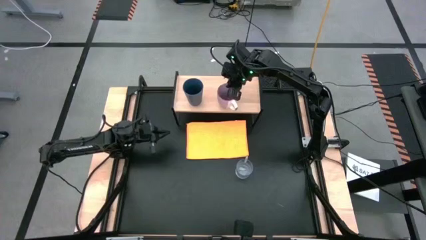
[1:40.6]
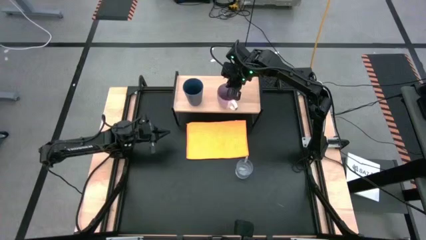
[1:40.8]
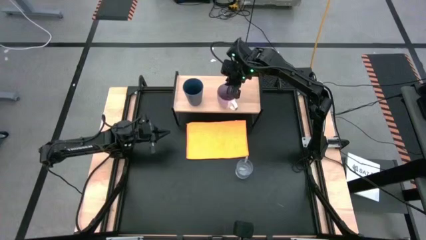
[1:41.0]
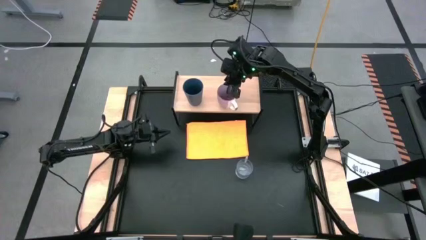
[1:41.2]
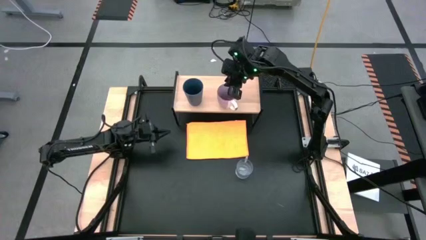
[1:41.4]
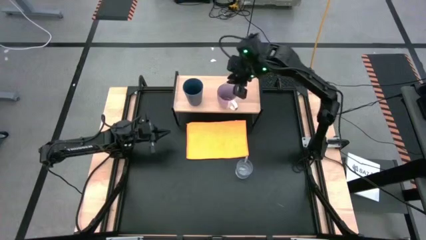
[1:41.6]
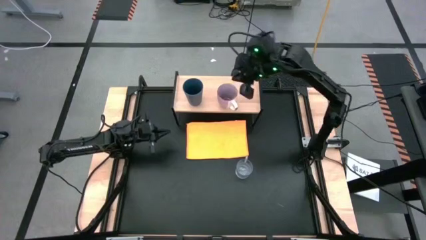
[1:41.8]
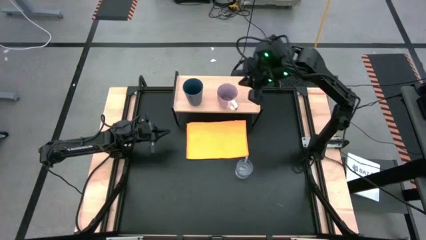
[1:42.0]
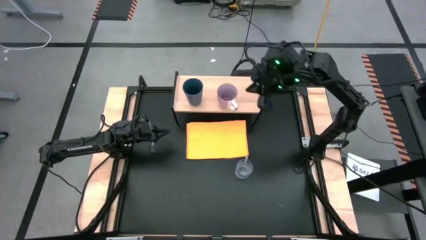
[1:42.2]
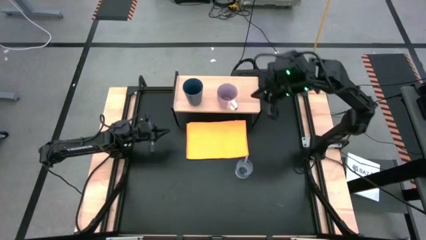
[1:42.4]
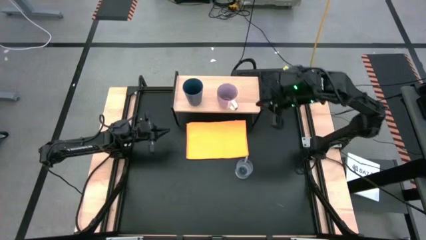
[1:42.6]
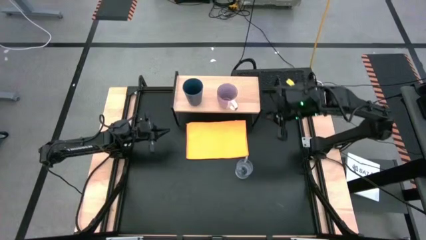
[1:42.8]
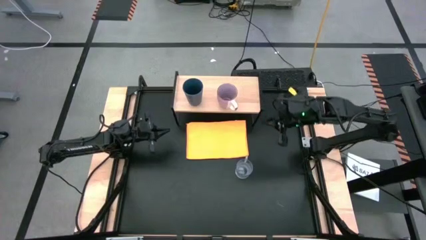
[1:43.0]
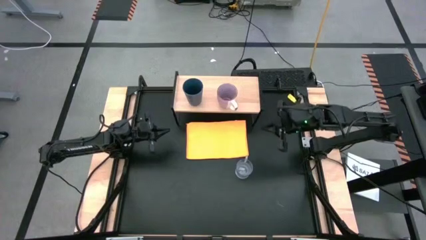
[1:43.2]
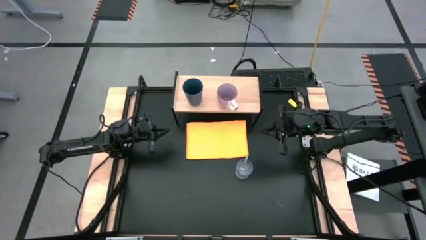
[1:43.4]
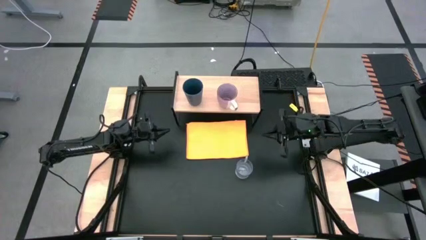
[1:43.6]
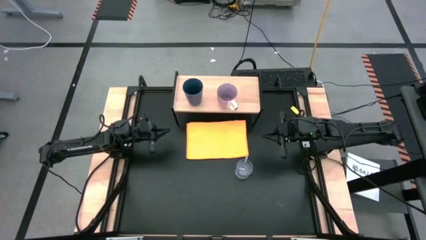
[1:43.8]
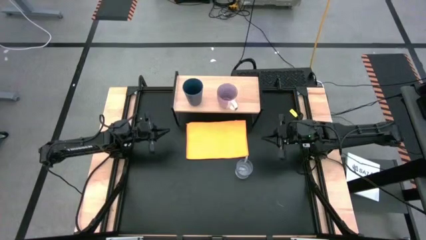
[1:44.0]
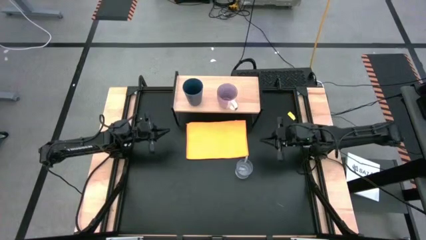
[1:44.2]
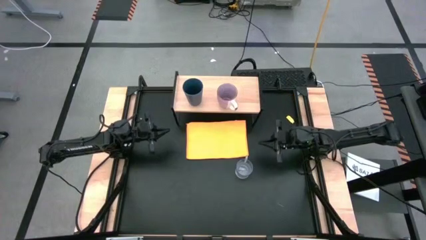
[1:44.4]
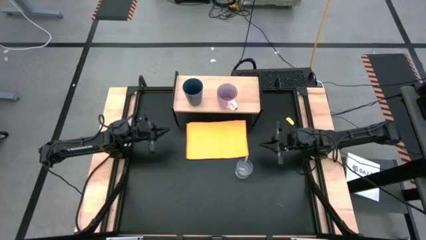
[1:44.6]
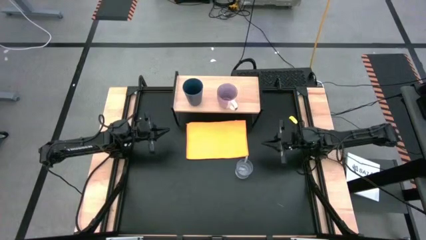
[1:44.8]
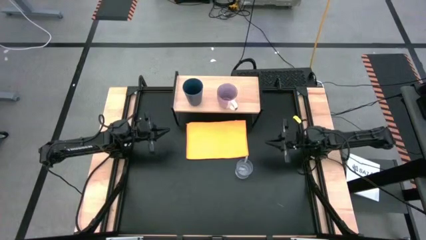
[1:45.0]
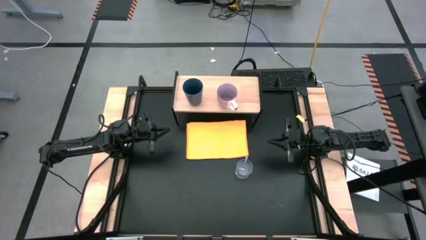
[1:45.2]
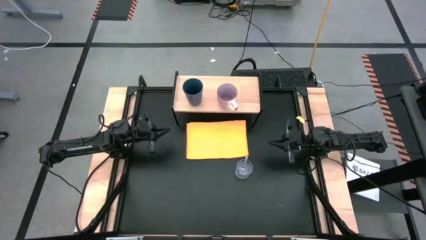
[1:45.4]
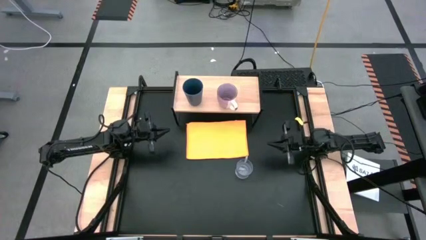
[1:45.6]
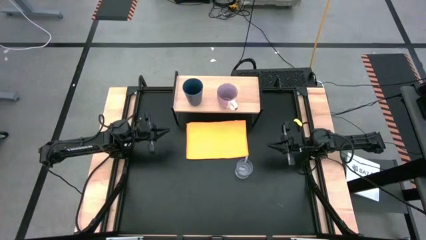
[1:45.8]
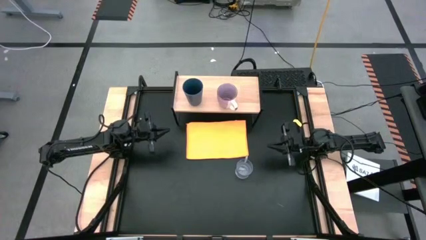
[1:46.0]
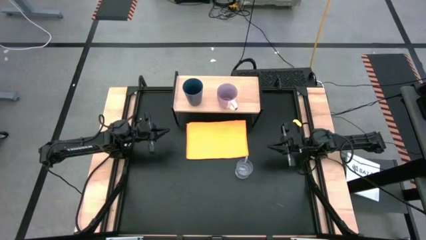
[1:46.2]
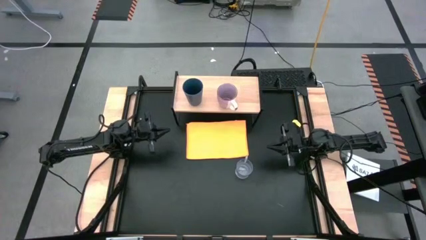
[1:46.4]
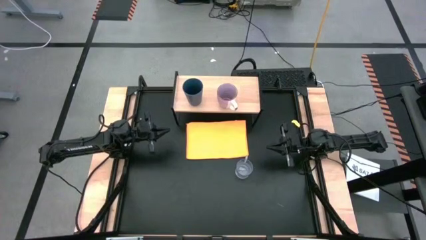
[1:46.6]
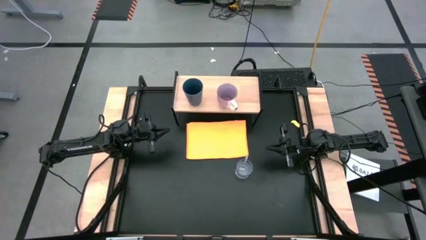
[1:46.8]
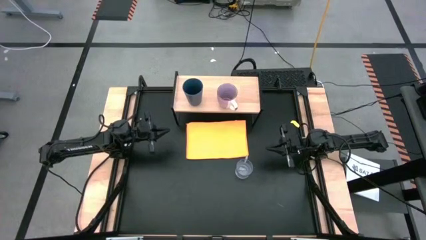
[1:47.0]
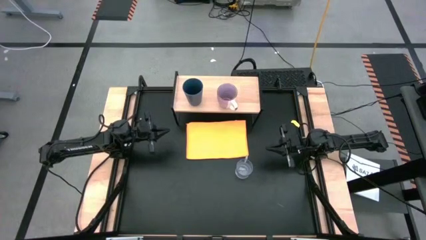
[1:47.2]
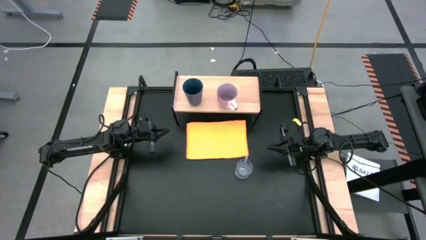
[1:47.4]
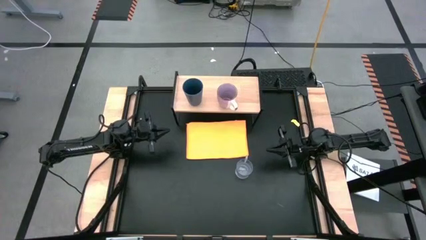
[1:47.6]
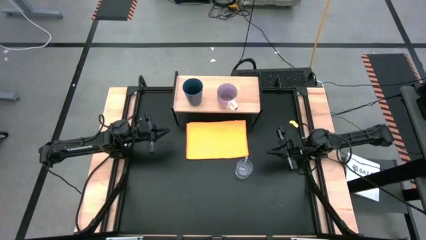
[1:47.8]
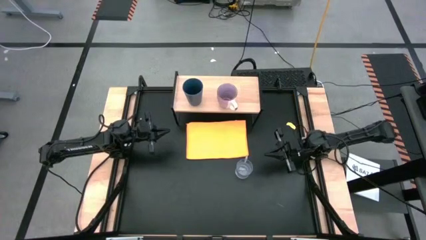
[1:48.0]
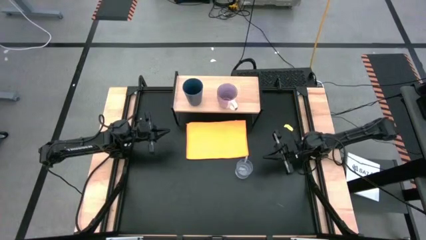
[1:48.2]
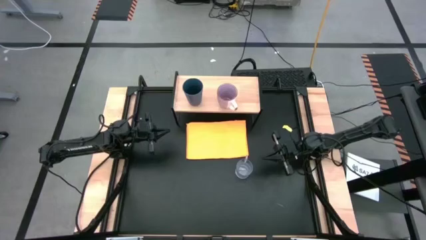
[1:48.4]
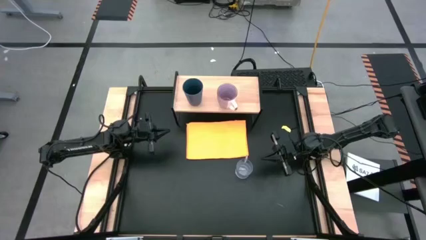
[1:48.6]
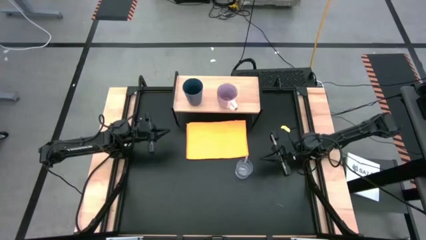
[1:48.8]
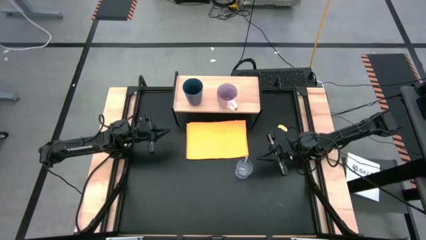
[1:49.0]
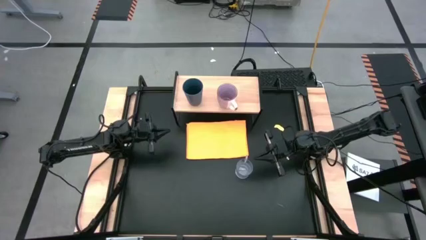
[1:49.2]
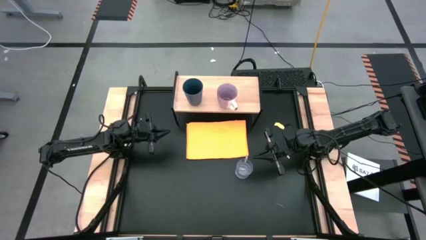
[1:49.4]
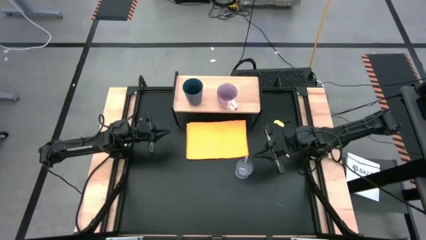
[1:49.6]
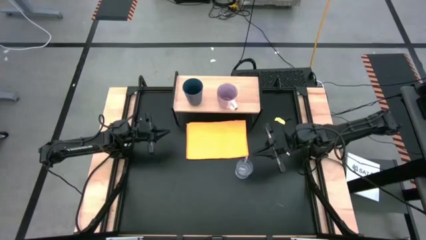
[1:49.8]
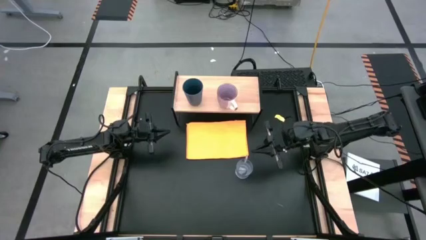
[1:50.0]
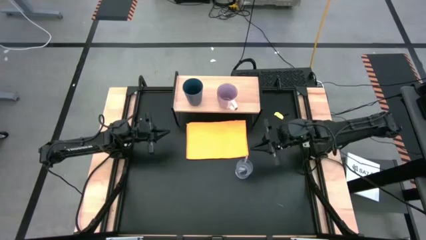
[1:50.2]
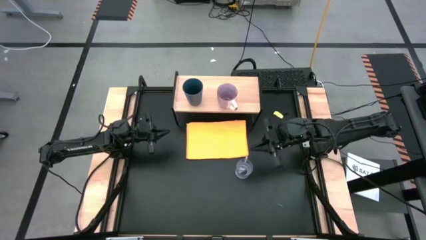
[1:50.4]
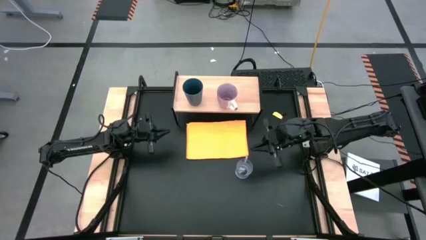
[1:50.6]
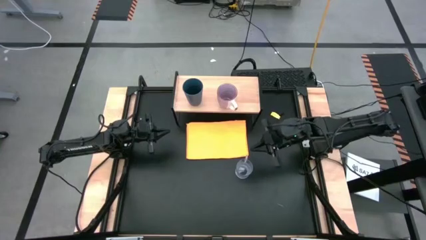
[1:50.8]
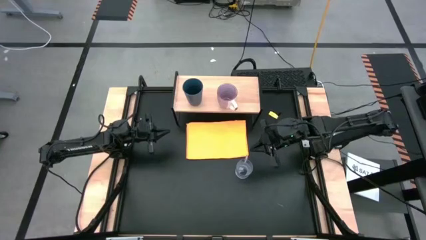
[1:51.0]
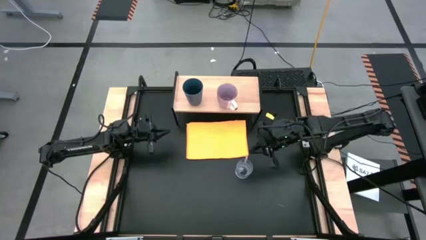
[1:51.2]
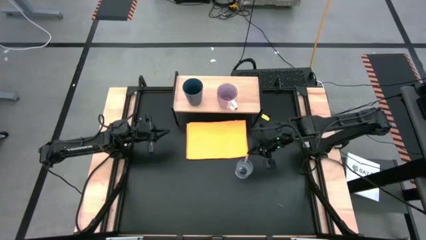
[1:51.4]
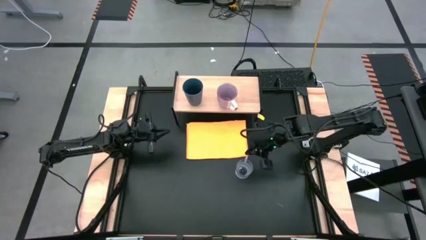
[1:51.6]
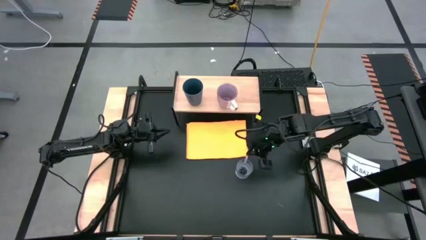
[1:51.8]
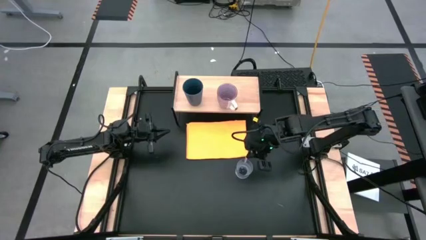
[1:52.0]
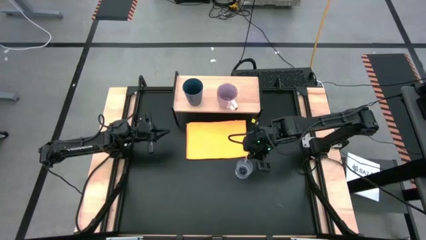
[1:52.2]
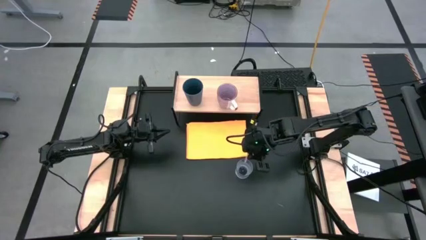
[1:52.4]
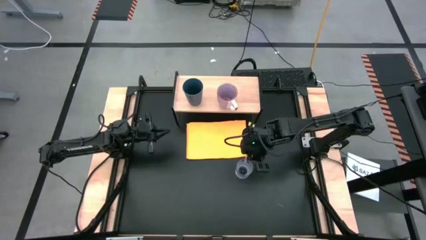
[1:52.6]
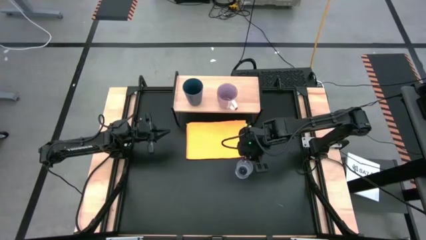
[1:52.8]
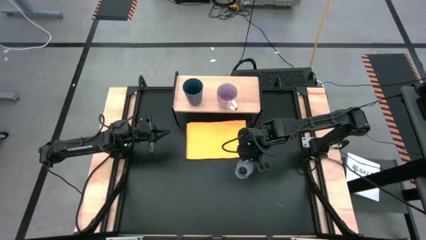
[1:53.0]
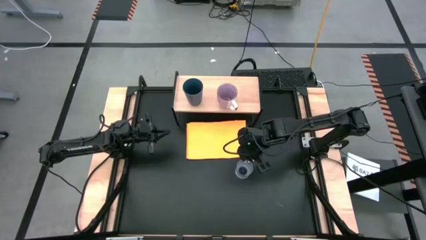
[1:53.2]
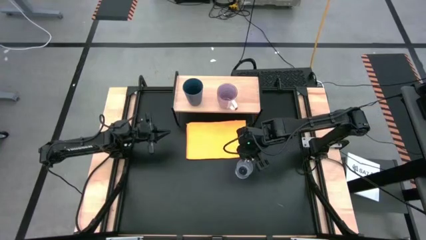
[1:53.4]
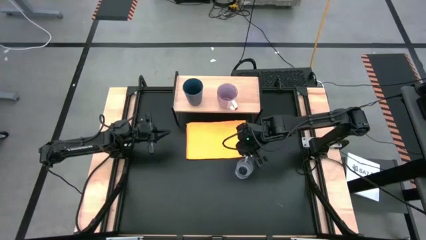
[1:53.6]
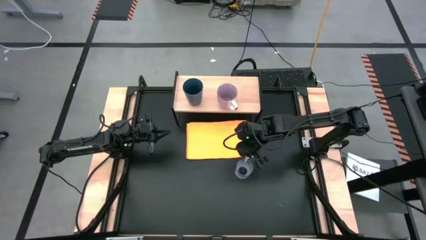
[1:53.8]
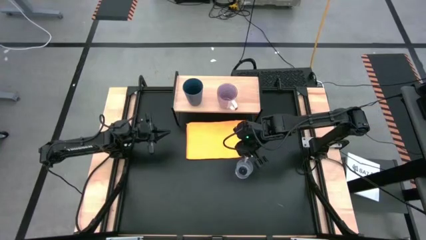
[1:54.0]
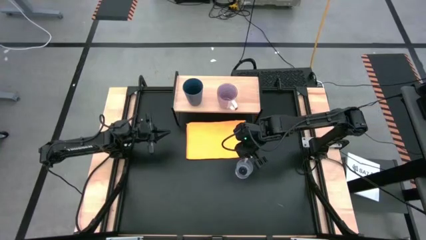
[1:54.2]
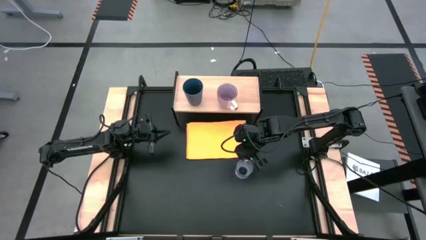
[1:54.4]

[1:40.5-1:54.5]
Task: Stack small to large cups/mugs on shelf
Put the transparent mug on the shelf

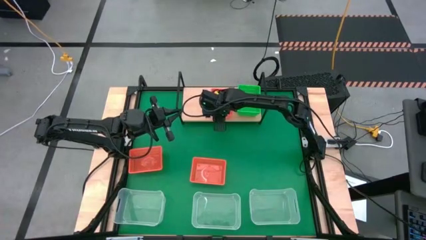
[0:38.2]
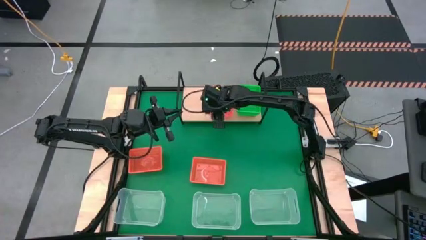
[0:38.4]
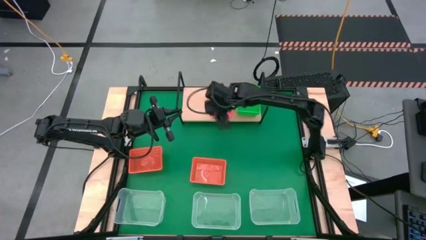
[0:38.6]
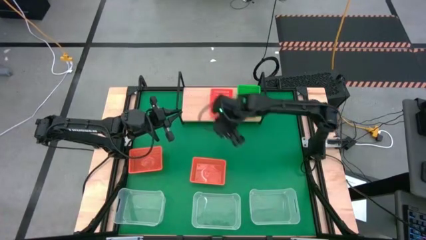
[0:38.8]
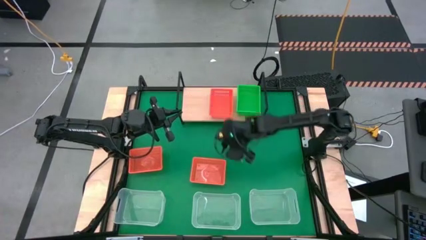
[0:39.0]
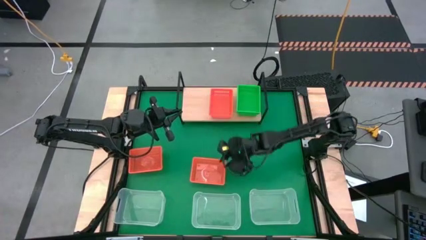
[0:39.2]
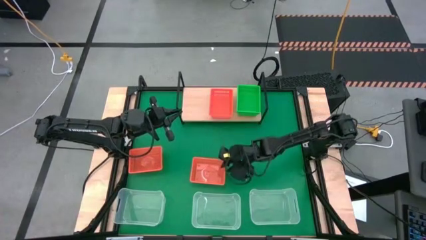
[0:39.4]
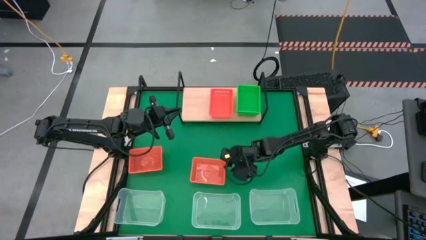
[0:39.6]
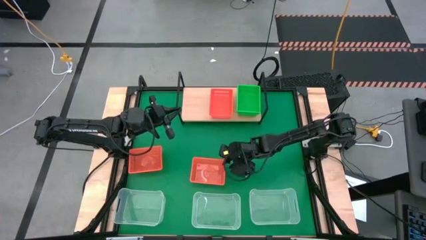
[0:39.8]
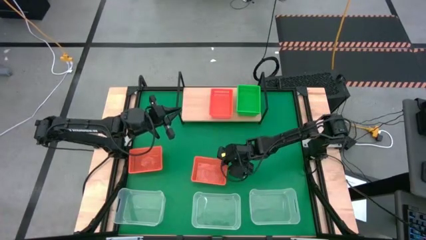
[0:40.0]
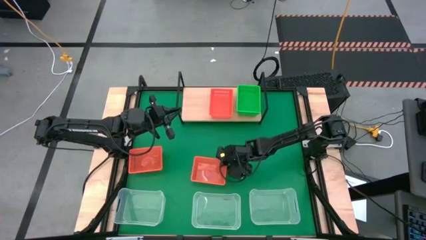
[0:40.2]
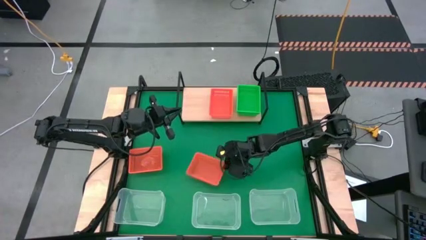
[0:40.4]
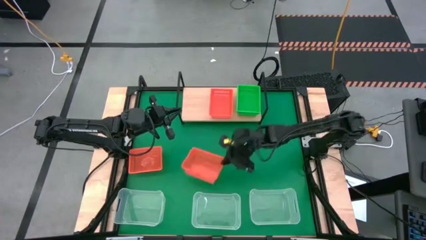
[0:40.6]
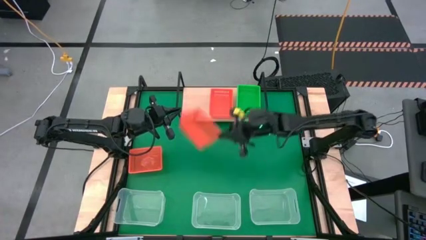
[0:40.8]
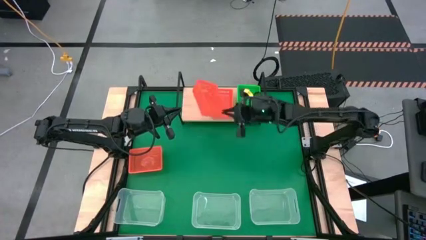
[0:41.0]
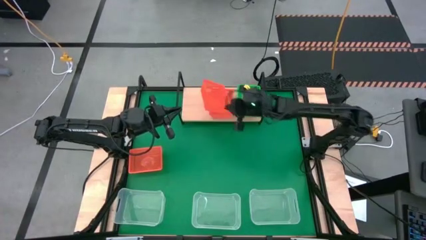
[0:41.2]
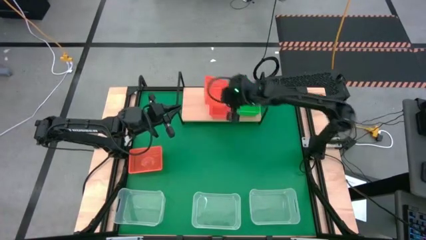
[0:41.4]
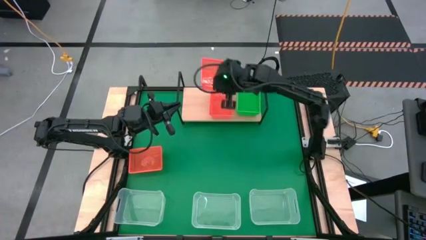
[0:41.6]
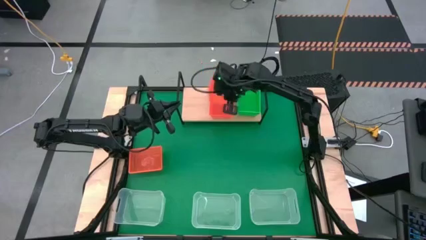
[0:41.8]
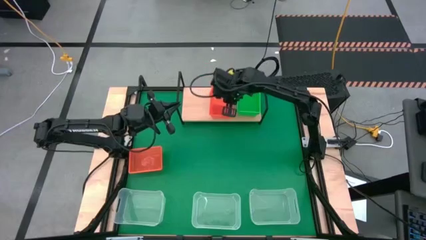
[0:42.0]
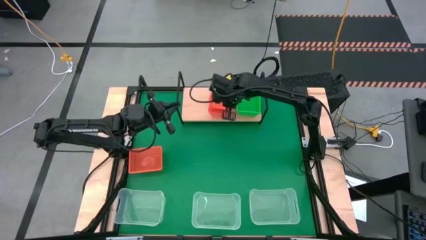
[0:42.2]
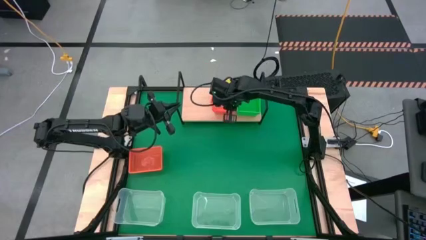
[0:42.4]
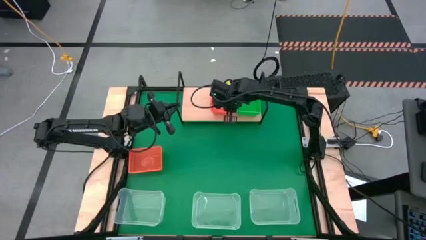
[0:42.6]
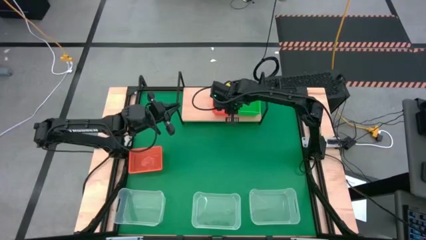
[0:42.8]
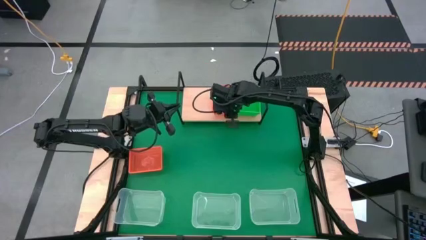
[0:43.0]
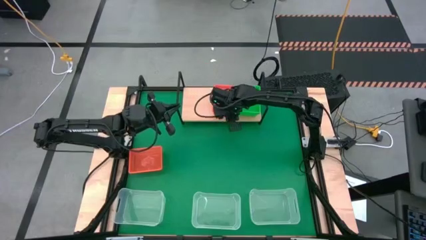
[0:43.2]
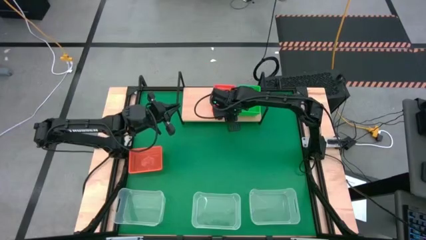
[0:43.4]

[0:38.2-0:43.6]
Task: Stack baskets on shelf by color
Stack the right orange bin on the orange bin on the shelf
